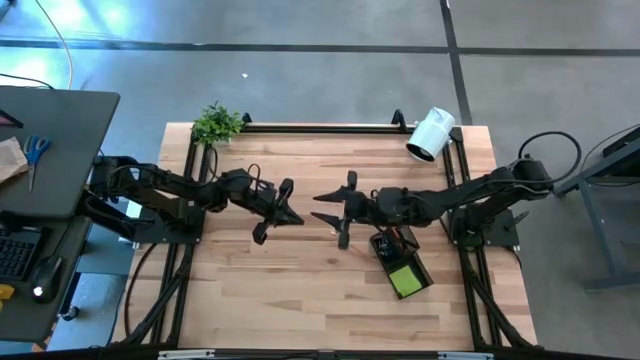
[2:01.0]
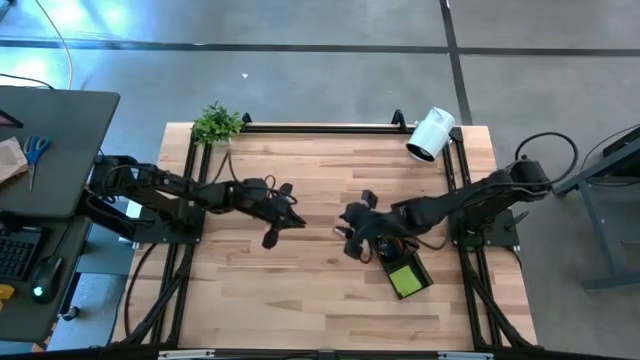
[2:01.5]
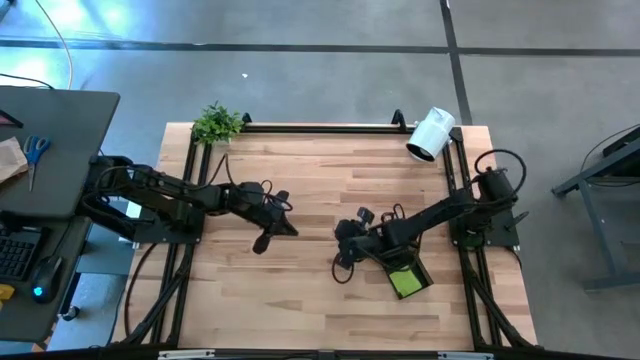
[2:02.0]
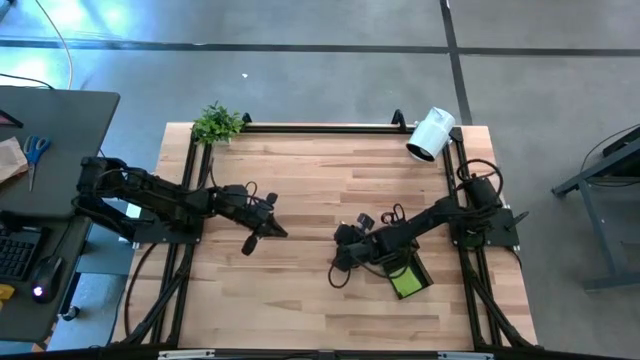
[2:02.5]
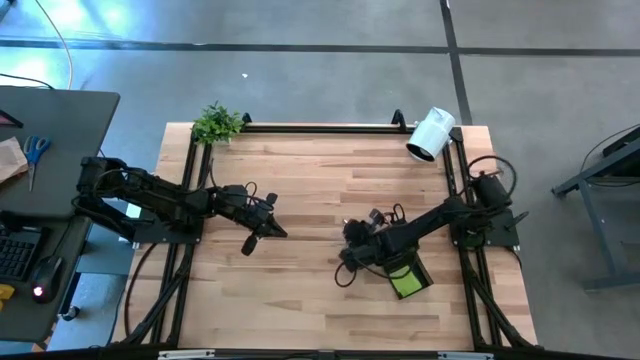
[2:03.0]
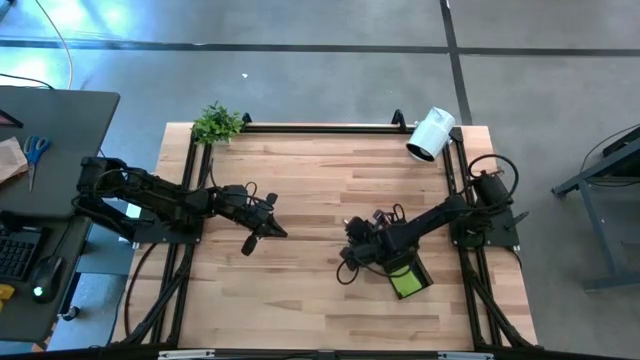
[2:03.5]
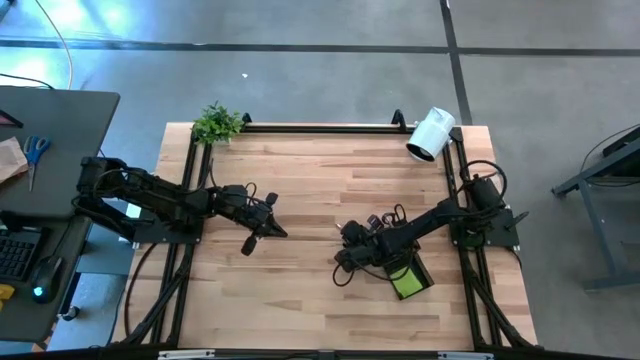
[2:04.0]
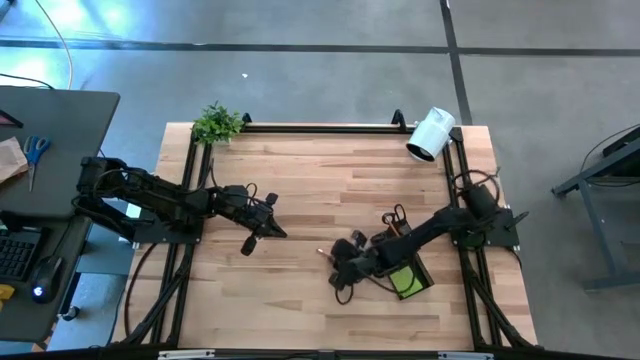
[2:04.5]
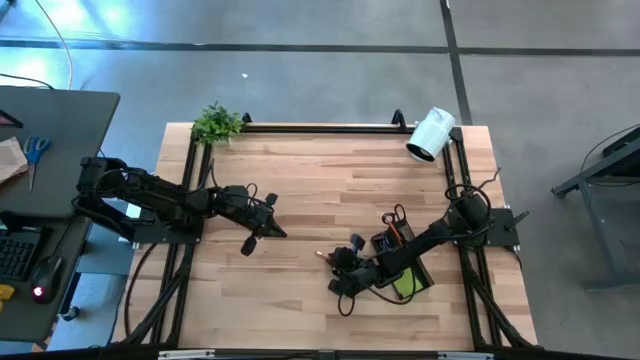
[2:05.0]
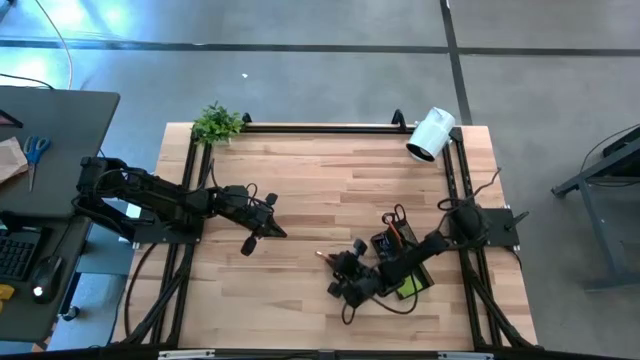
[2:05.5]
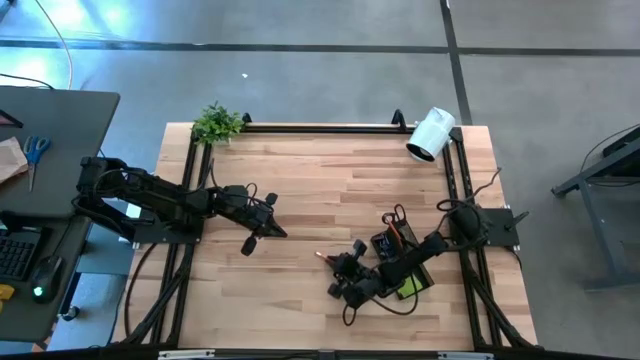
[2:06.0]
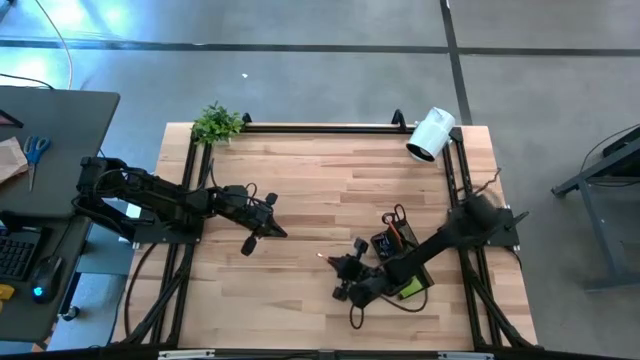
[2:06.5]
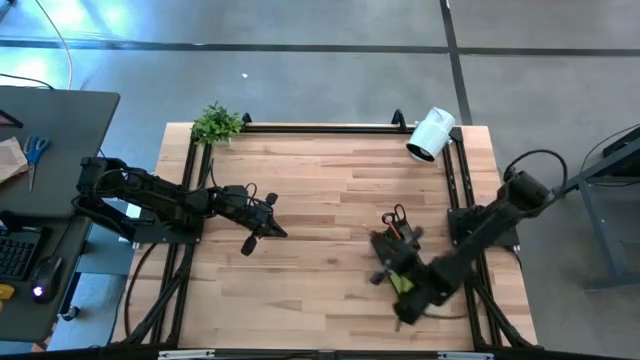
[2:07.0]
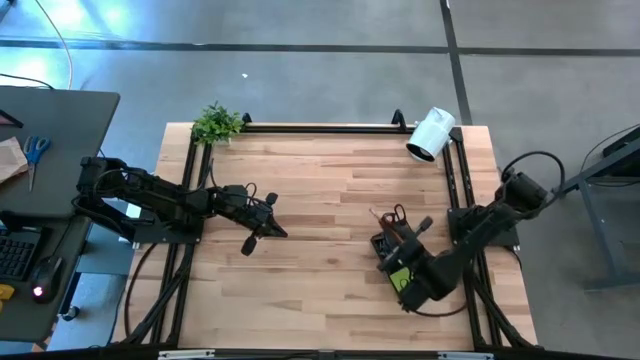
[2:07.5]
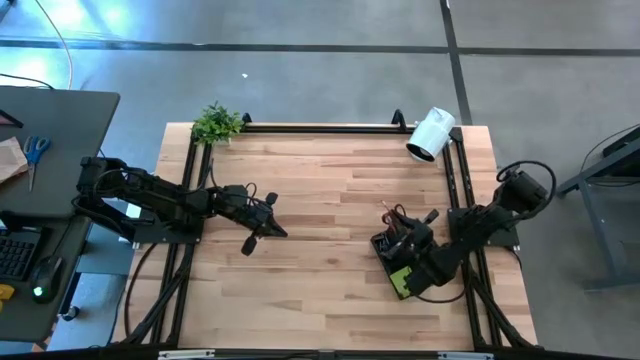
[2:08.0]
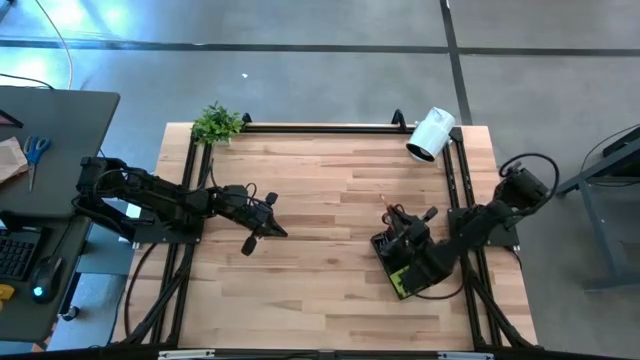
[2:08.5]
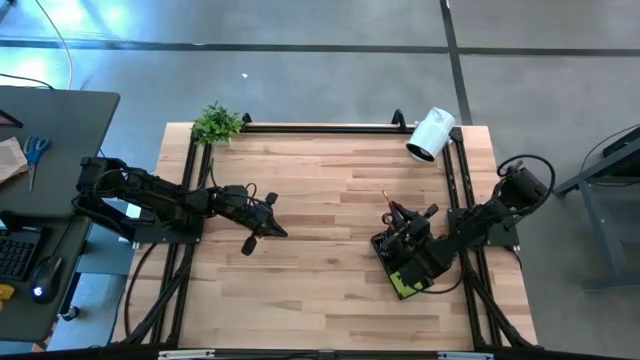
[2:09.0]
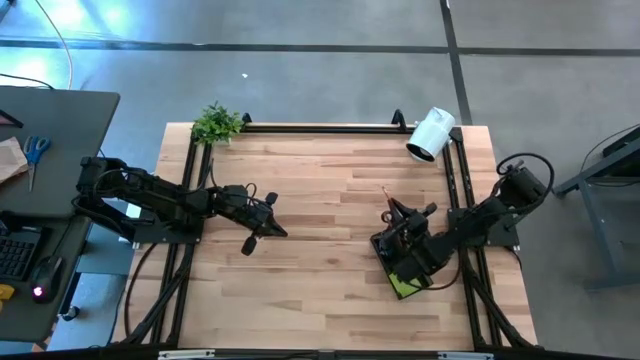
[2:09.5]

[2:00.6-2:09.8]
Task: Pick and place office supplies into organizer
Put the orange pencil into the black desk organizer

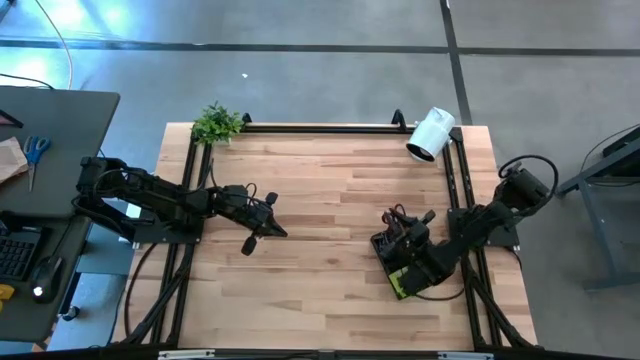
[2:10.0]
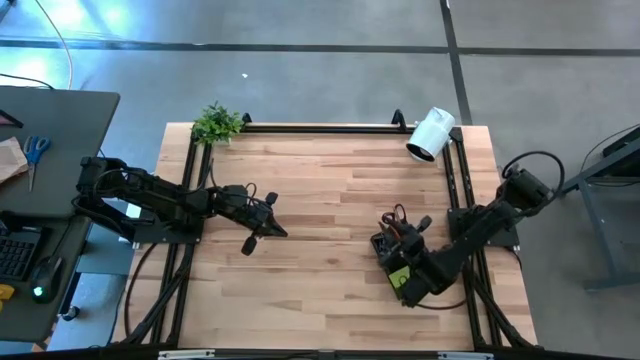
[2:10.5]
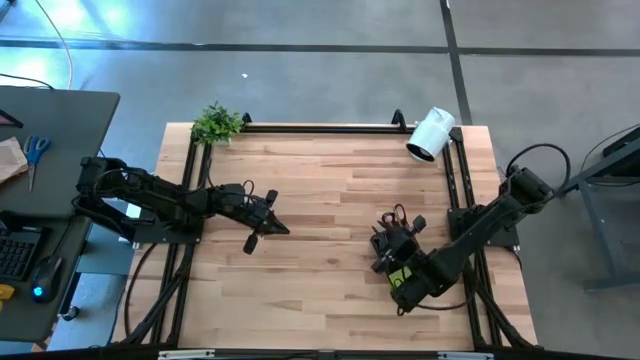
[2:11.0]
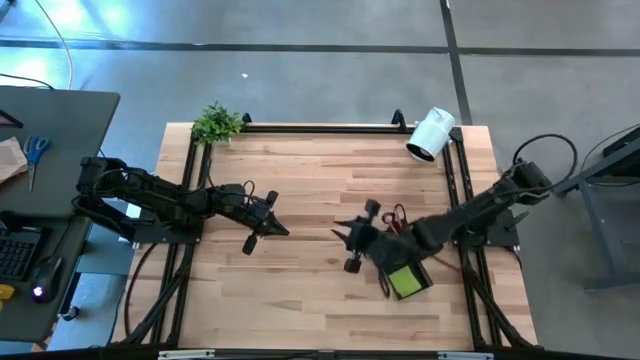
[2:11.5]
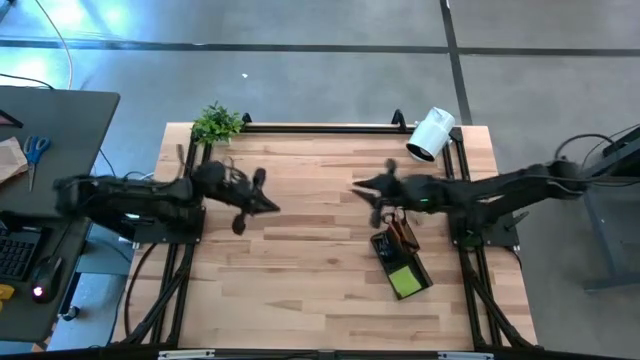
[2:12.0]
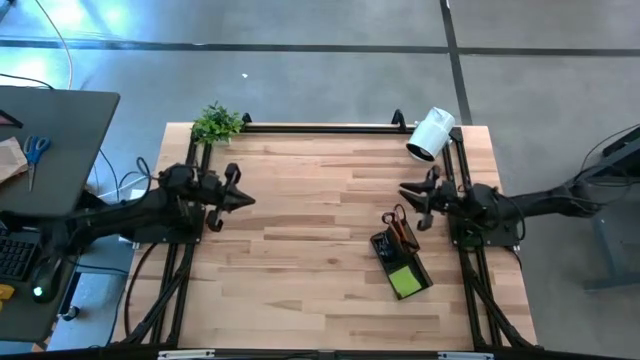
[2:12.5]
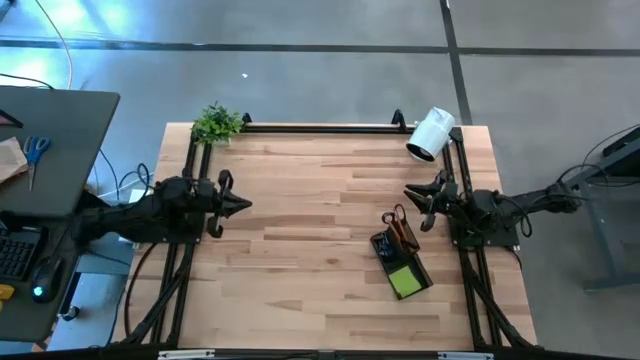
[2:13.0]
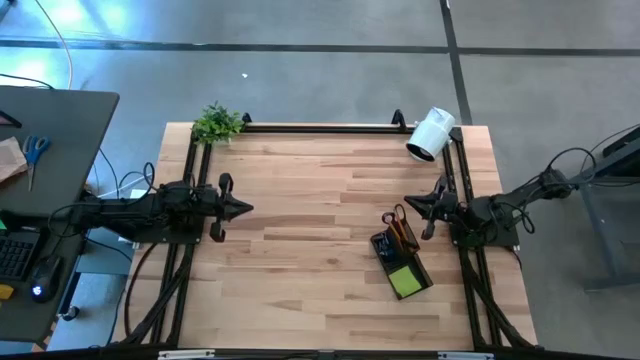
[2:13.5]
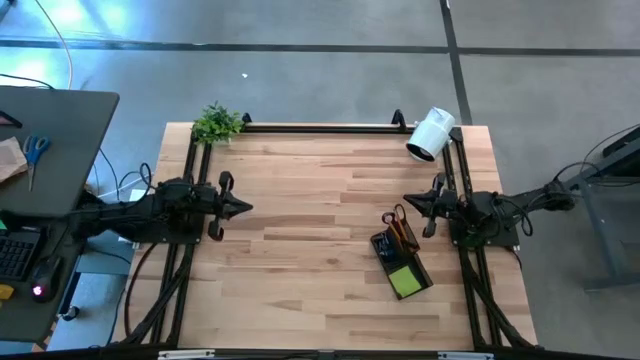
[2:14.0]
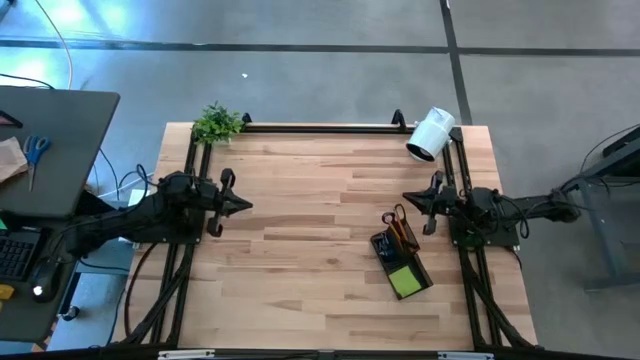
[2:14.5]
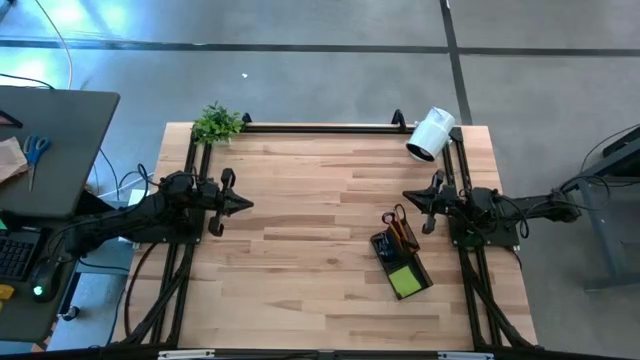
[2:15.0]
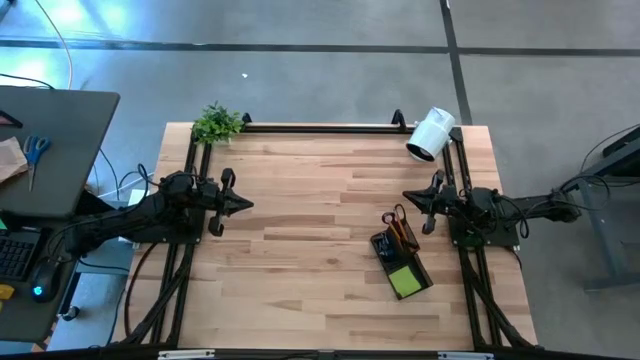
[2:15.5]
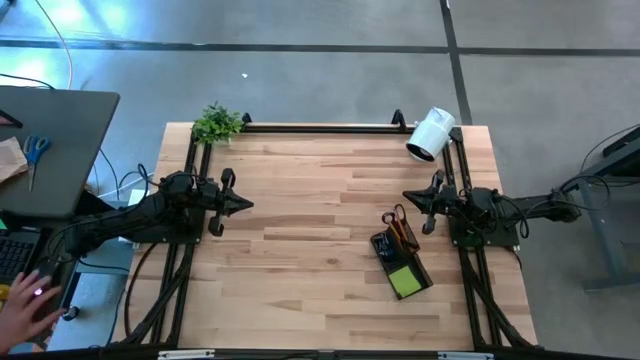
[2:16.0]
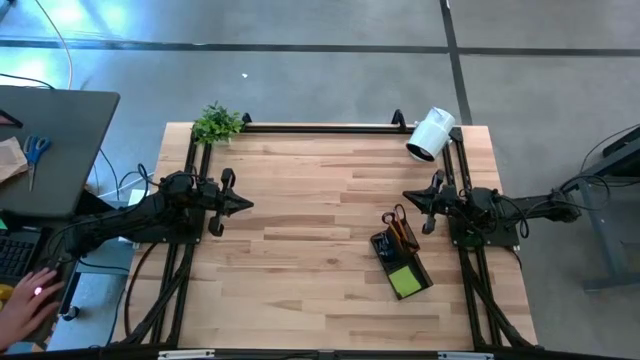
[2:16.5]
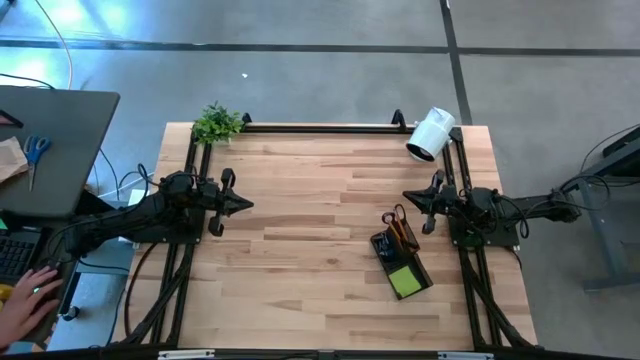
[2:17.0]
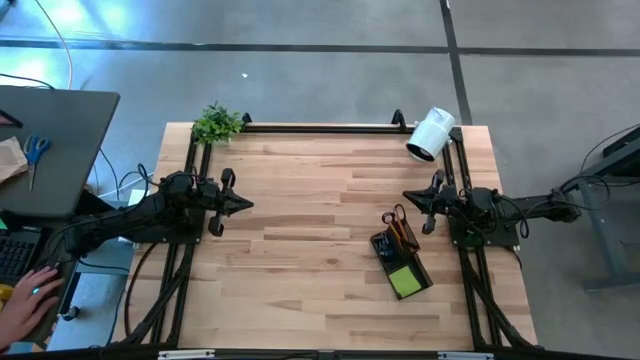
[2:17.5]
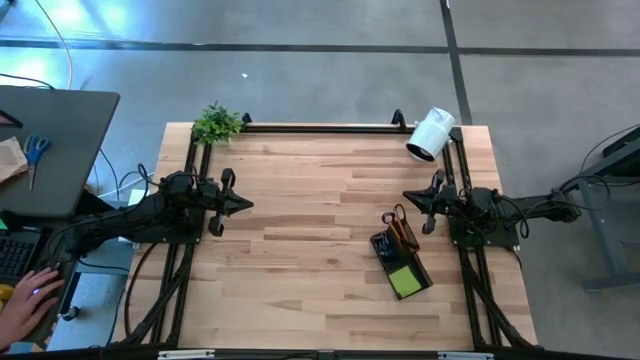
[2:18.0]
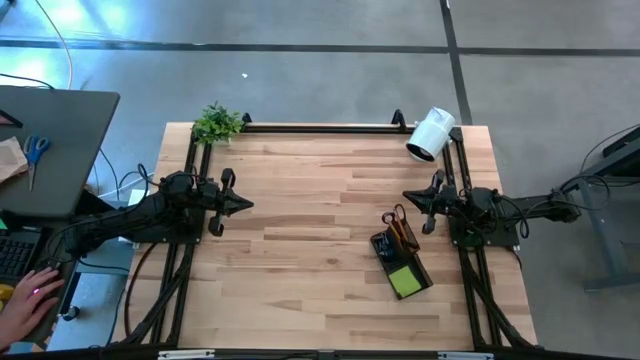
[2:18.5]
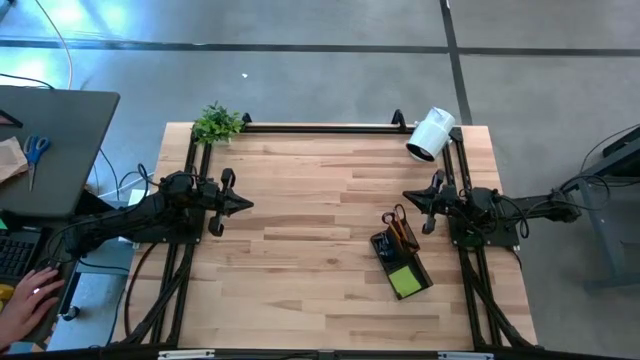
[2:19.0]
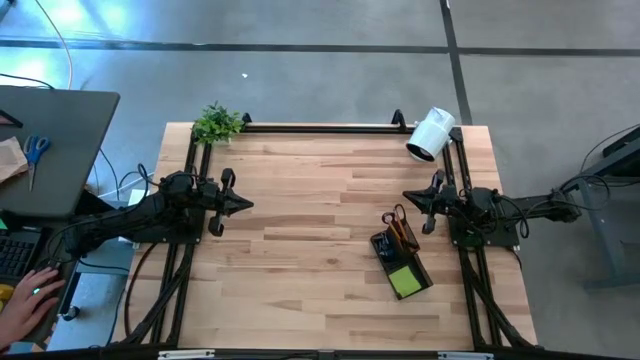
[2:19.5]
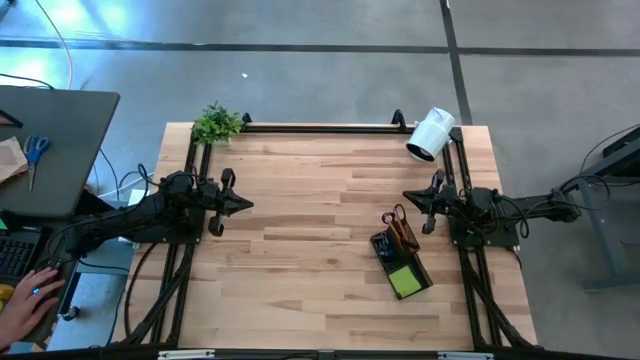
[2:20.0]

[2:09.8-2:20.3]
Return to Home Position

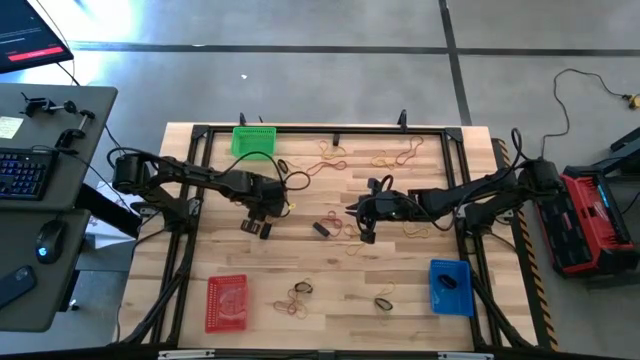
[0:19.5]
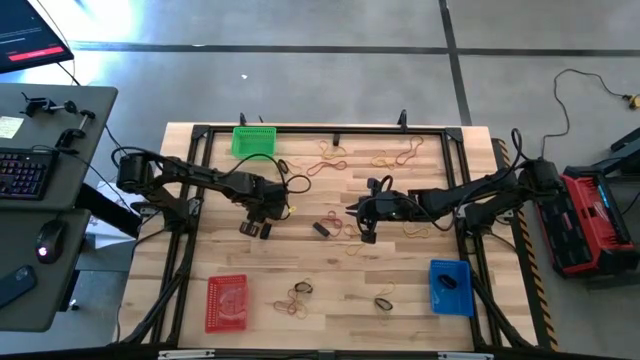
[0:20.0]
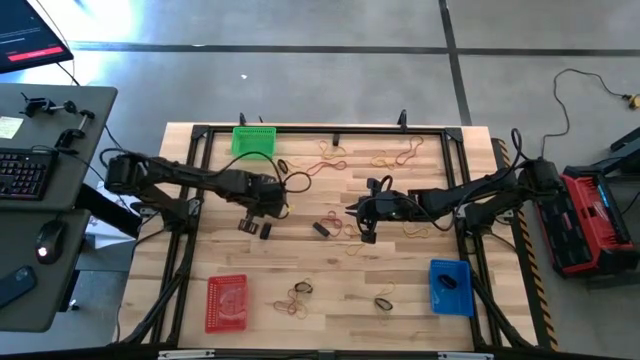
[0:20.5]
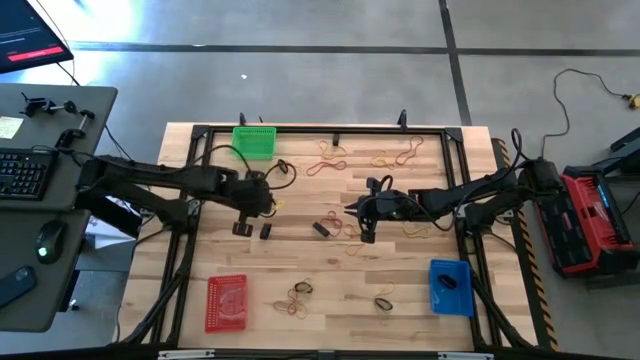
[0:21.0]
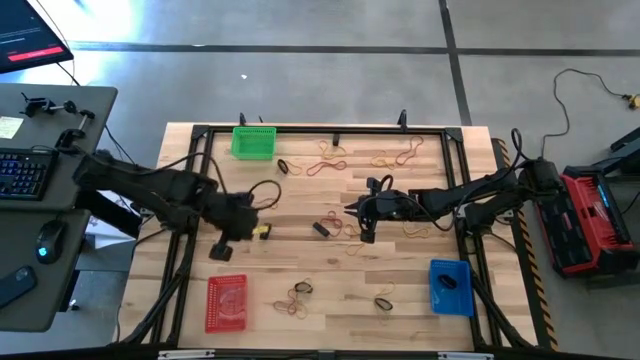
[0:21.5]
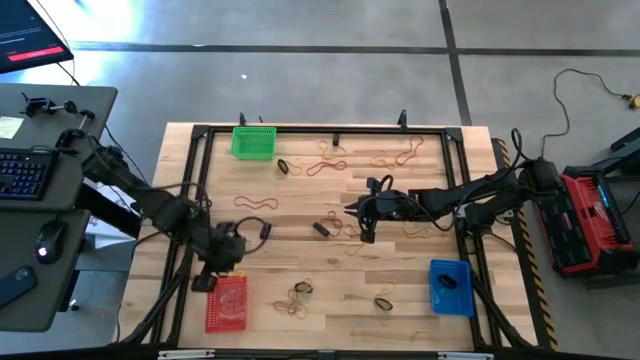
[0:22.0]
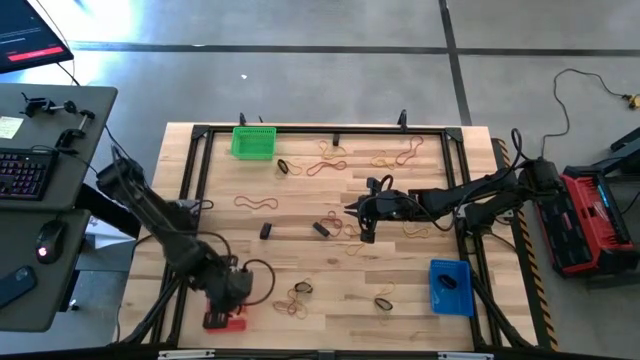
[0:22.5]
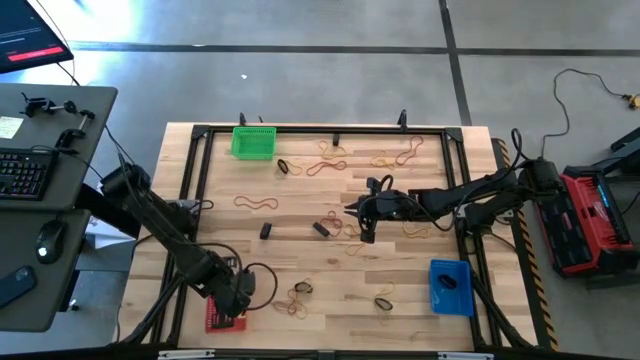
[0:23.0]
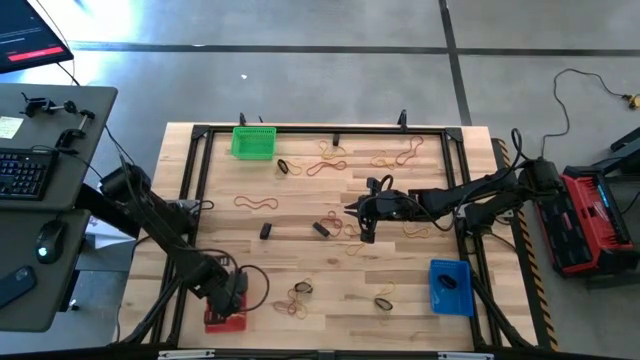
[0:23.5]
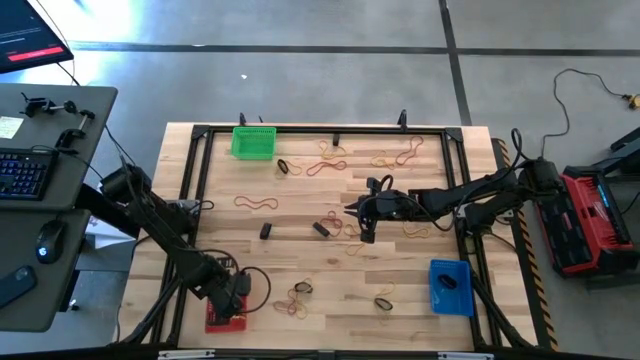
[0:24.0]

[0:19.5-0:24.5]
Task: Sort rubber bands into baskets
Put the yellow rubber band into the red bin
